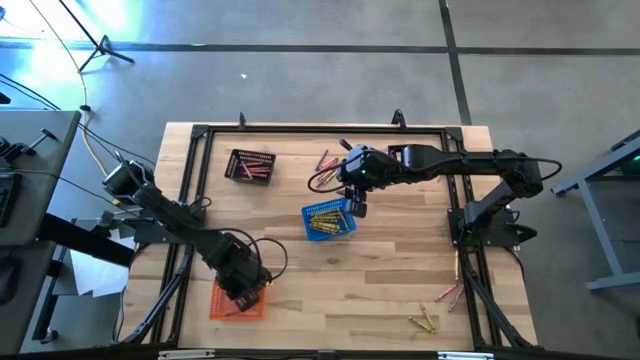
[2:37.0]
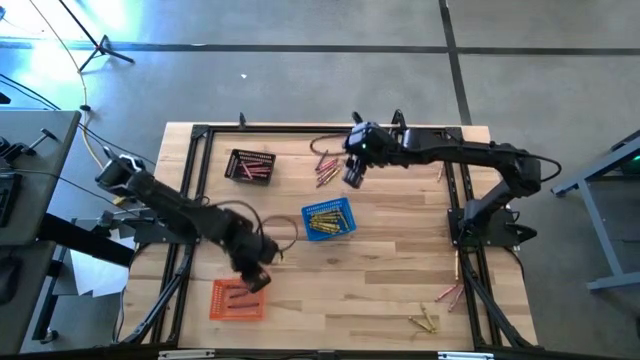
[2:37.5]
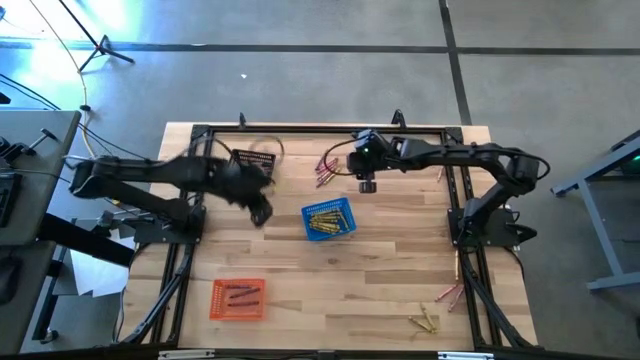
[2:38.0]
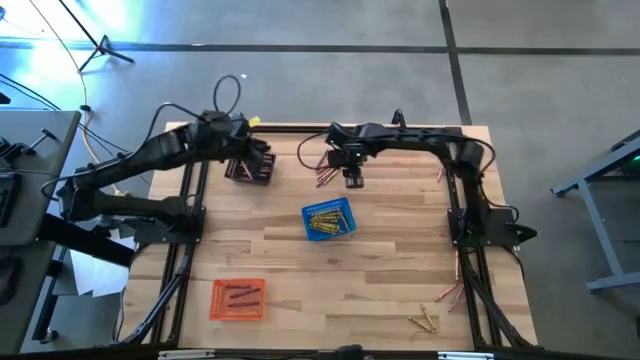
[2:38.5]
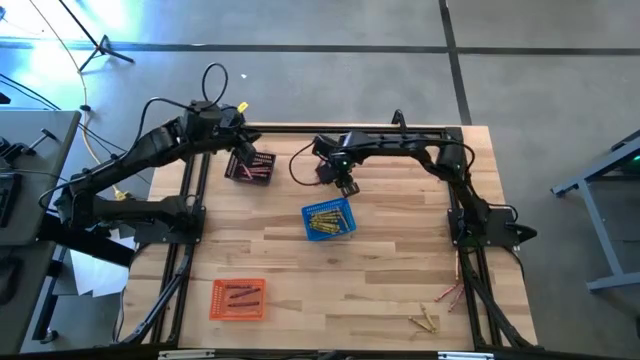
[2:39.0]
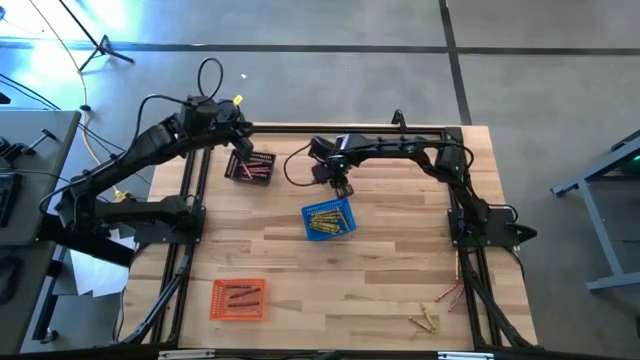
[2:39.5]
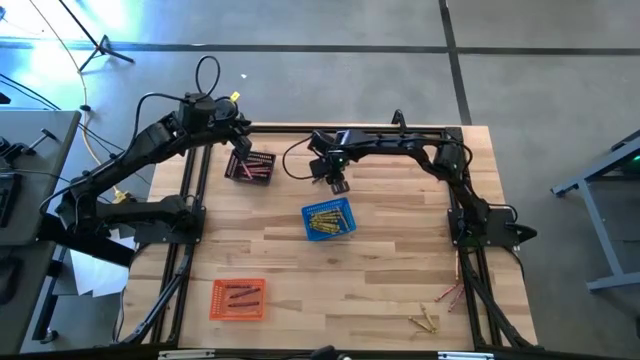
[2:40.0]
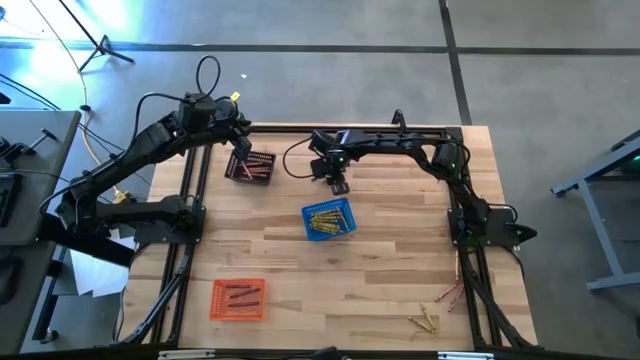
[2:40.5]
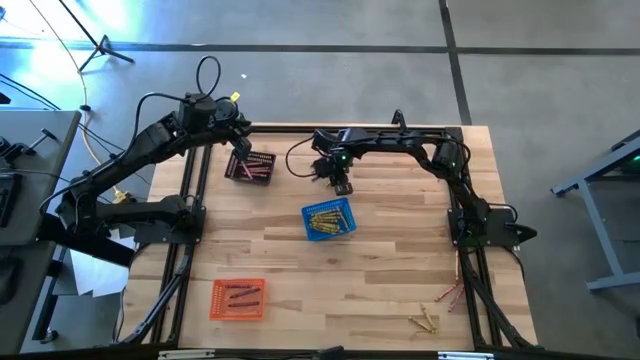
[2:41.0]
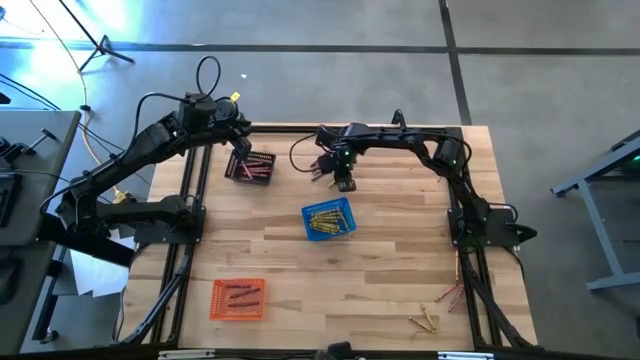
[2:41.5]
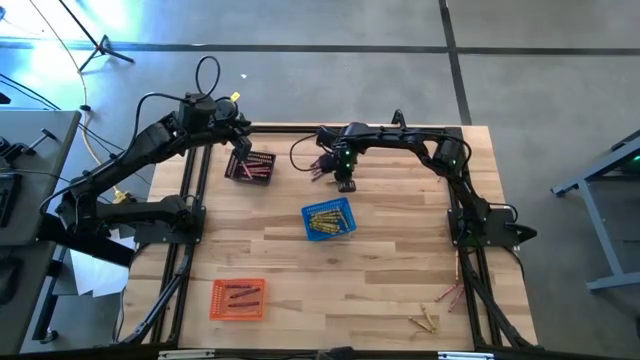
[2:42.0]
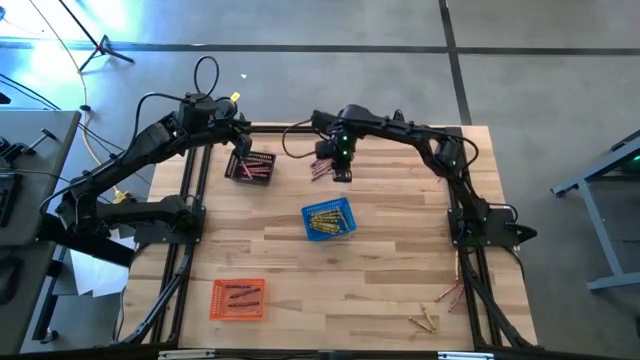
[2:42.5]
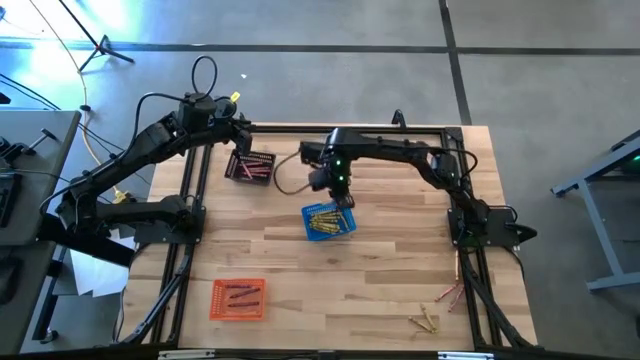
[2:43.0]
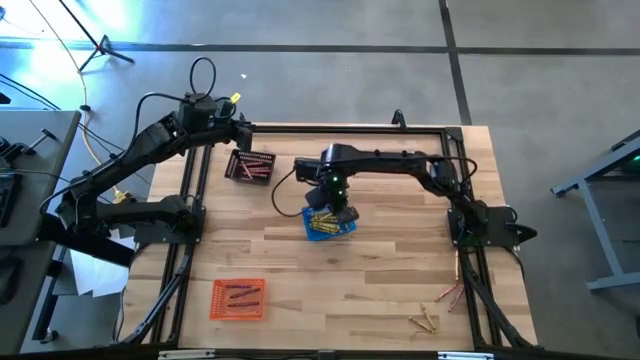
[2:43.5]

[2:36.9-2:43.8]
Task: Sort crayons
Put the yellow crayon into the blue basket

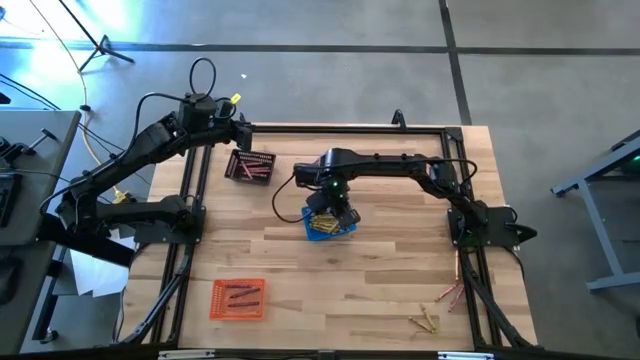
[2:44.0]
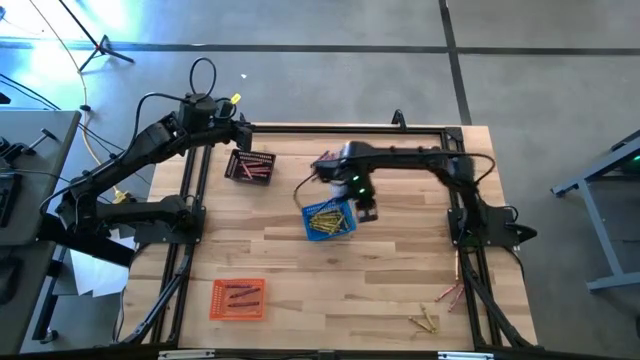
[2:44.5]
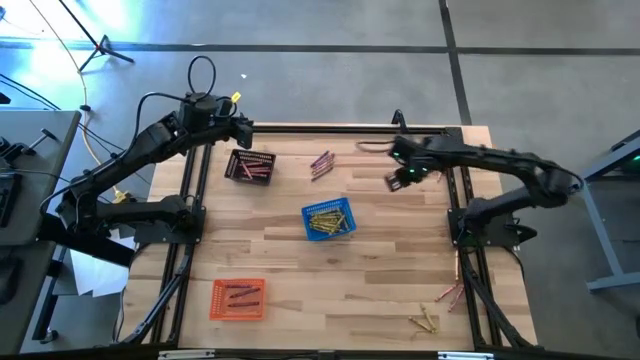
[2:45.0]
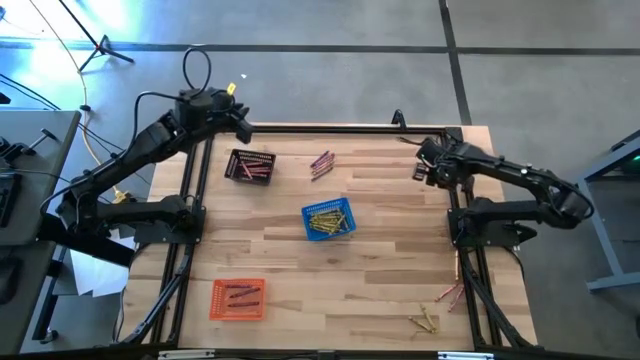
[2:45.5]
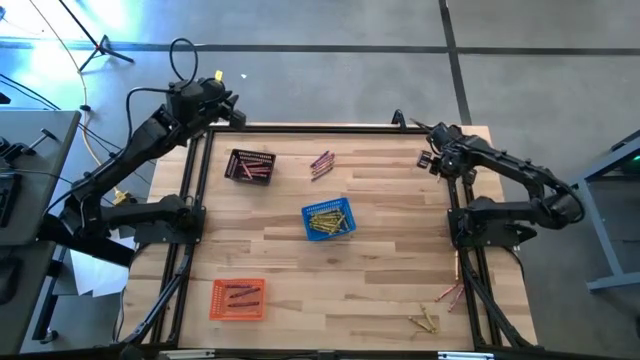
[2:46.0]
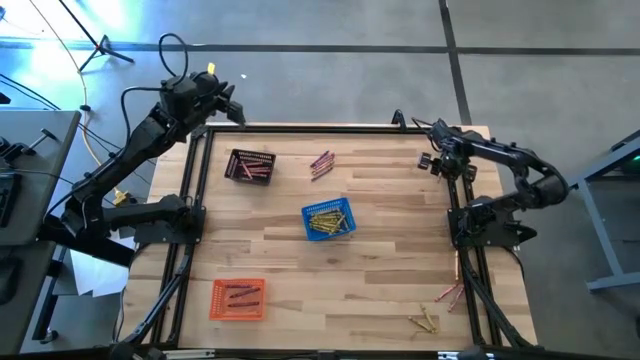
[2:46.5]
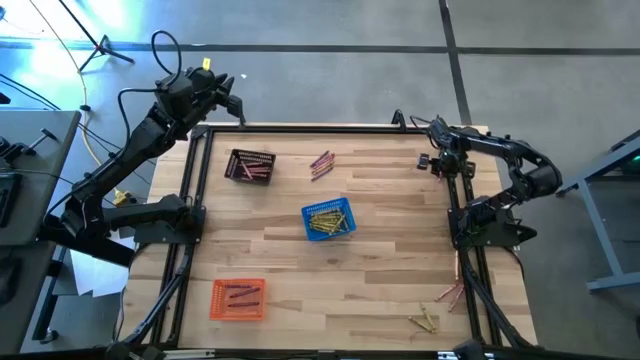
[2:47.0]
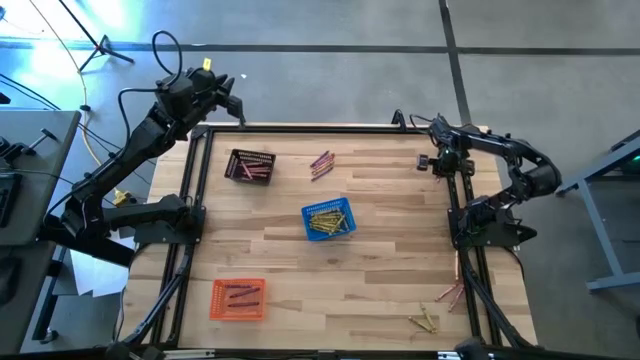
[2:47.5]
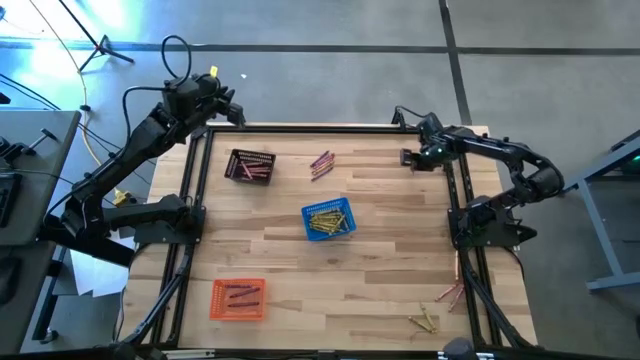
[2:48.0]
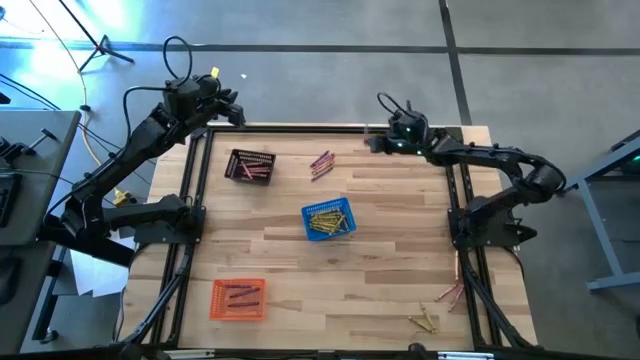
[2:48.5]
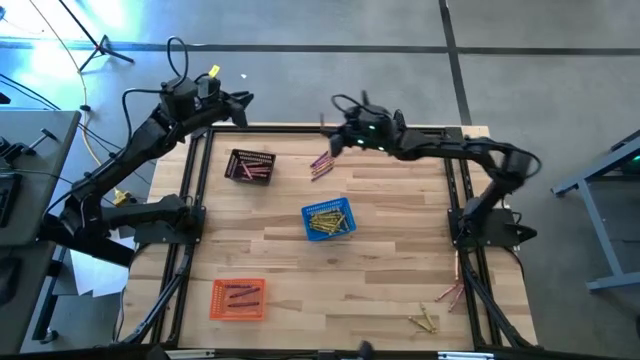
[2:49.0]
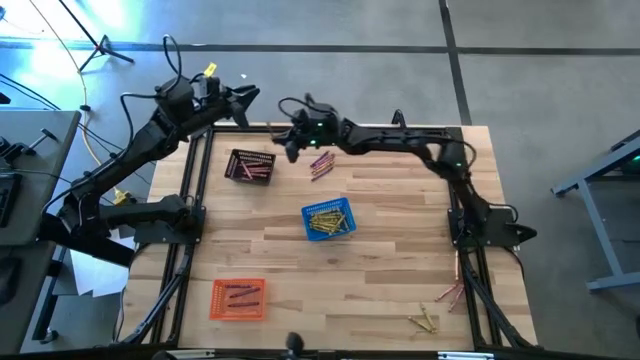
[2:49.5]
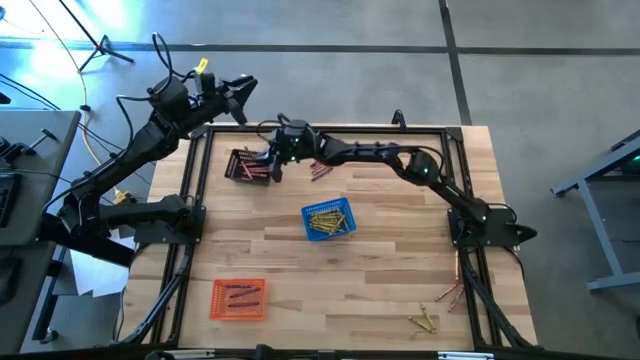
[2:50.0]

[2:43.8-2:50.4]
Put the red crayon into the black basket

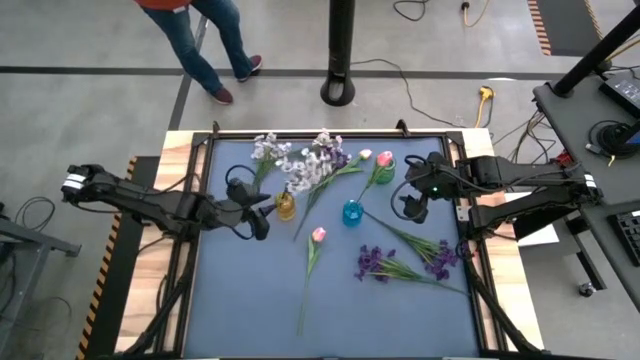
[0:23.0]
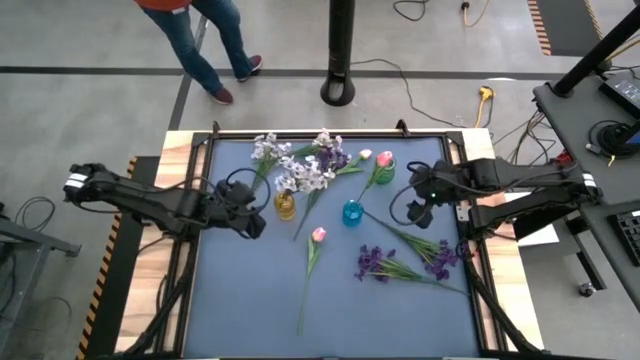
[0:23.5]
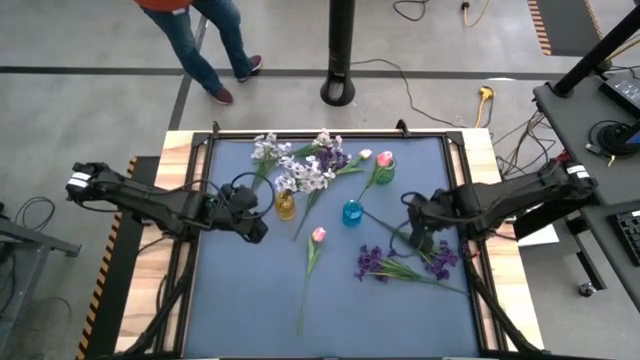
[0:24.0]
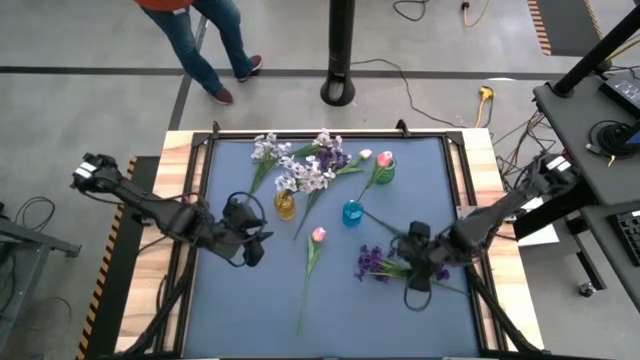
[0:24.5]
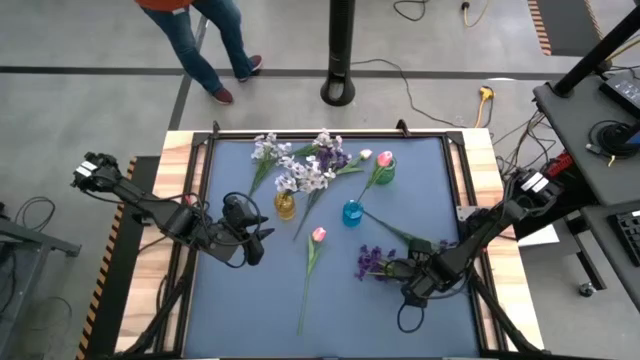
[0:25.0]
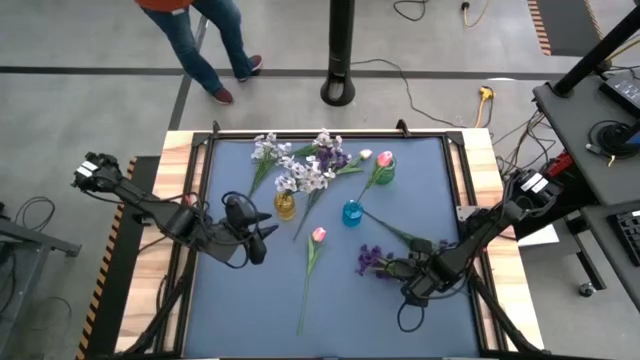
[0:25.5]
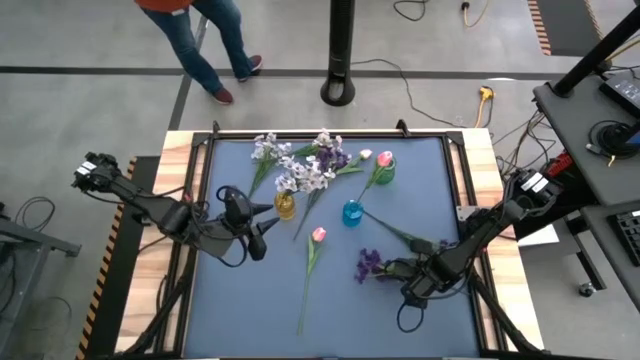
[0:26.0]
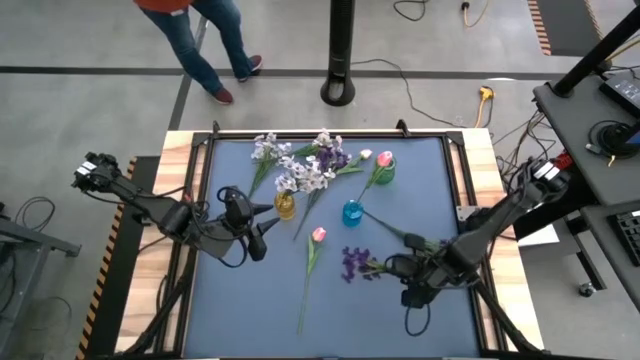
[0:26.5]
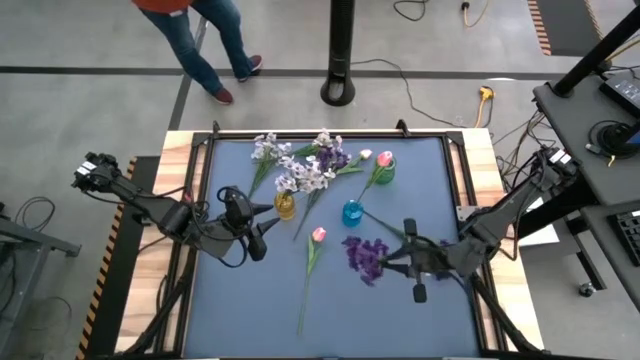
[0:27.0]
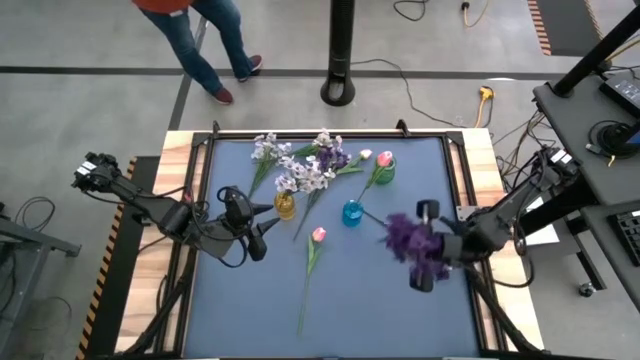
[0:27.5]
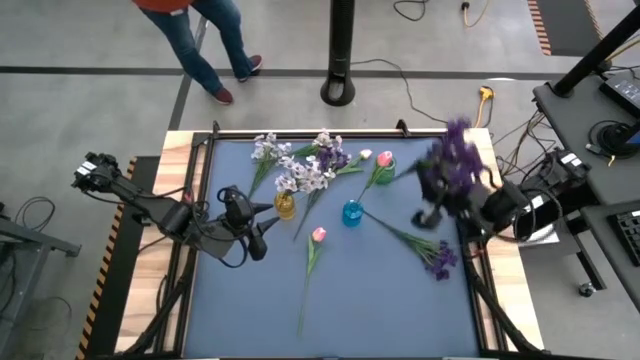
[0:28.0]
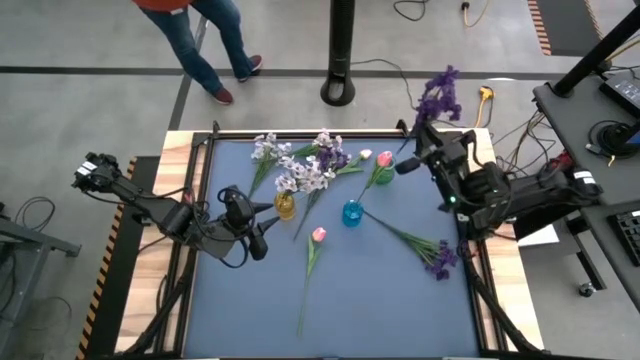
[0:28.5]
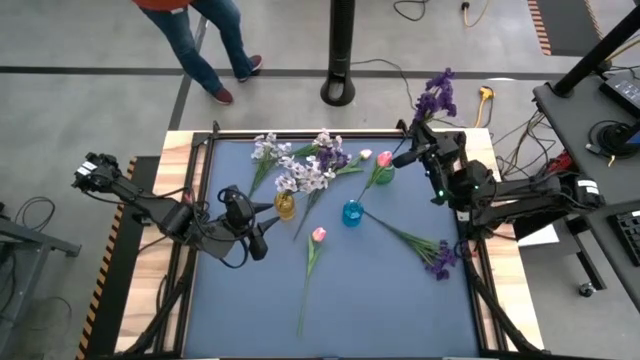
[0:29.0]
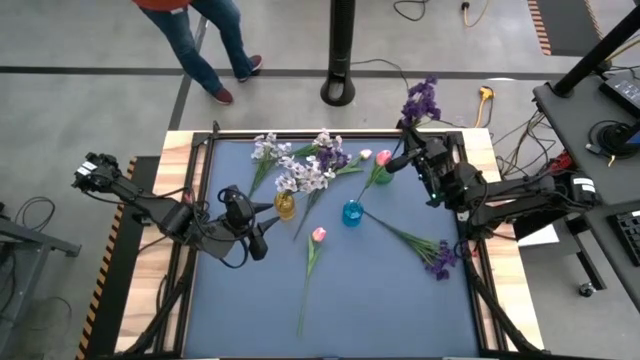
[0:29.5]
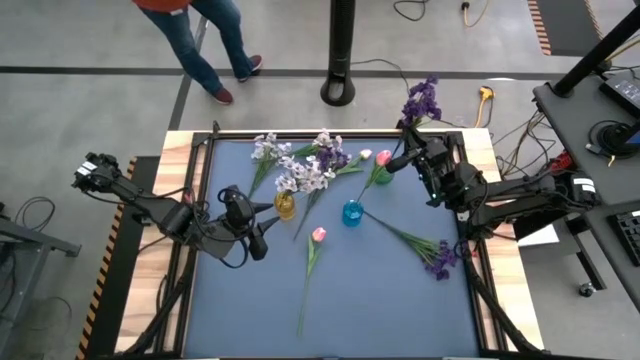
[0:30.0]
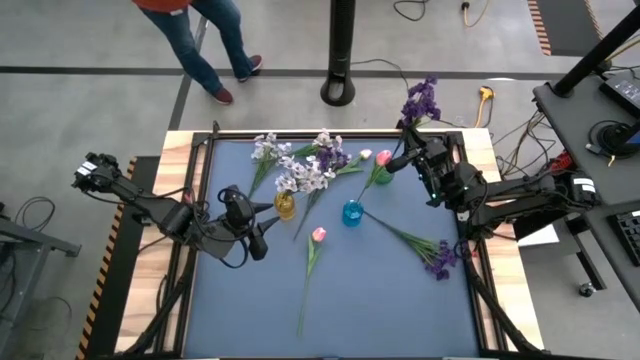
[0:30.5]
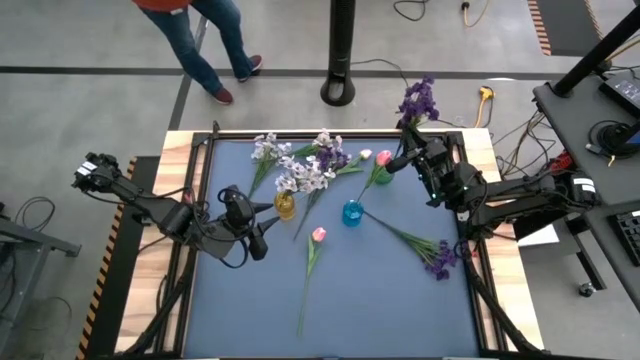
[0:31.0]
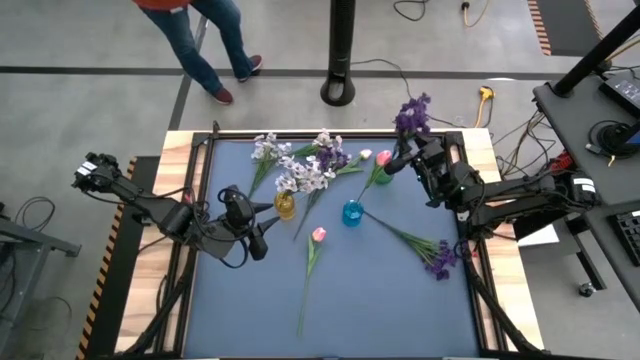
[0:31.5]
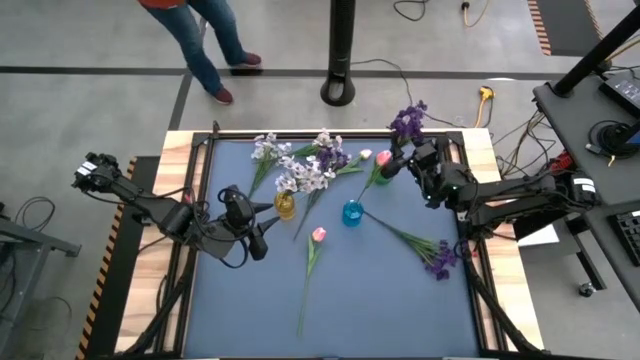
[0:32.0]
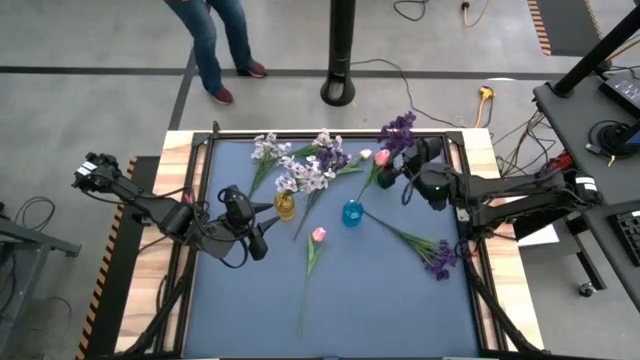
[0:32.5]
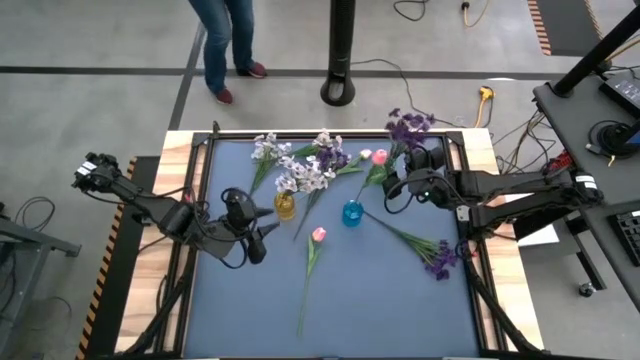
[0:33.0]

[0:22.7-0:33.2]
Task: Sort flowers into vase by color
Put the bottom violet flowers into the green flower vase
